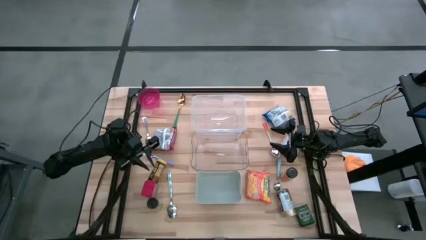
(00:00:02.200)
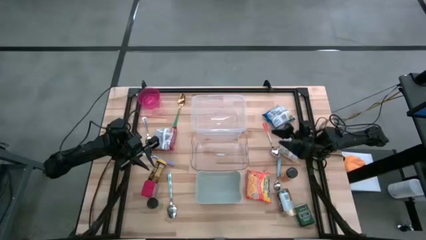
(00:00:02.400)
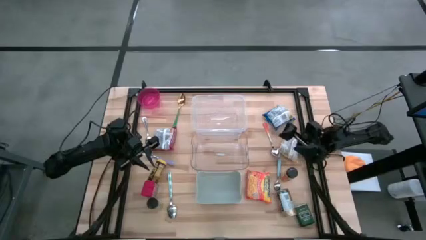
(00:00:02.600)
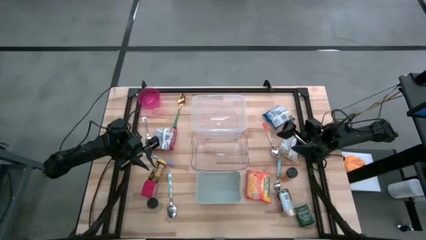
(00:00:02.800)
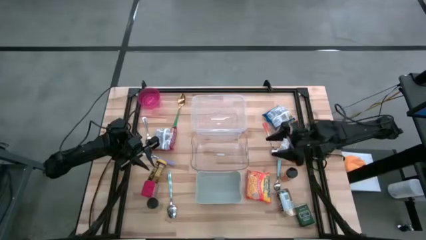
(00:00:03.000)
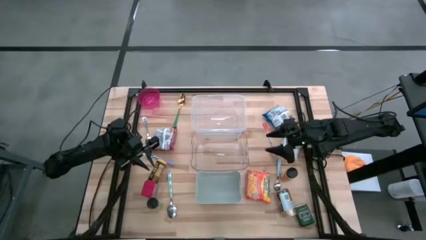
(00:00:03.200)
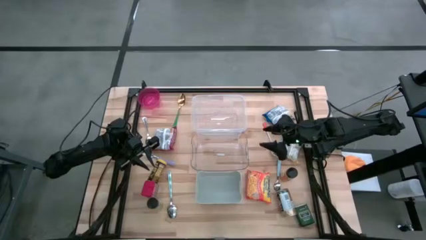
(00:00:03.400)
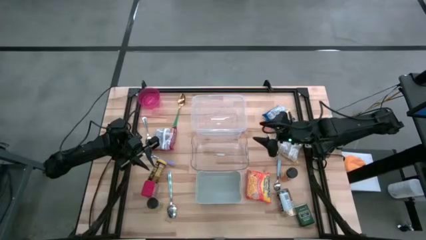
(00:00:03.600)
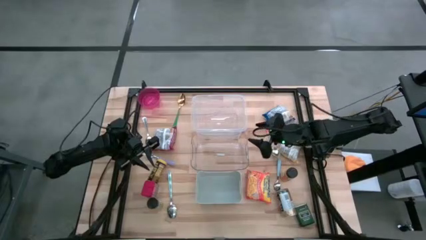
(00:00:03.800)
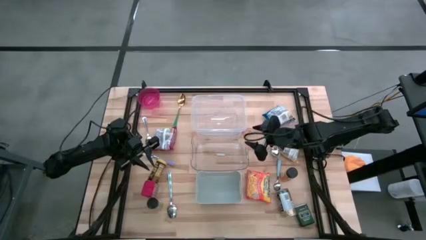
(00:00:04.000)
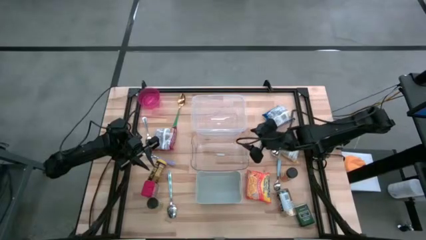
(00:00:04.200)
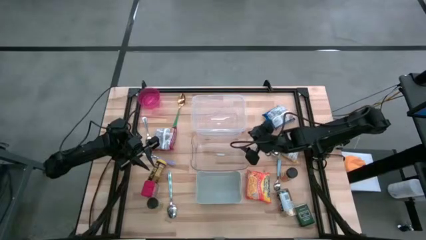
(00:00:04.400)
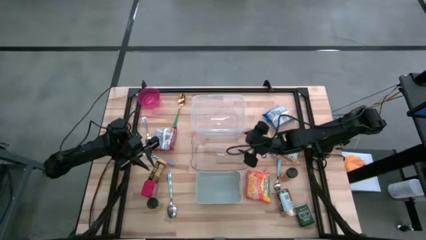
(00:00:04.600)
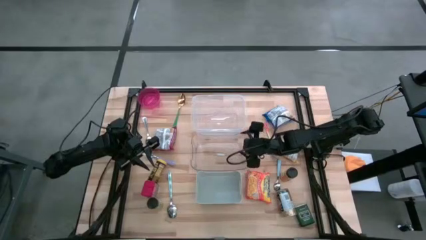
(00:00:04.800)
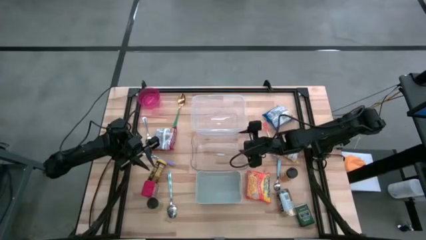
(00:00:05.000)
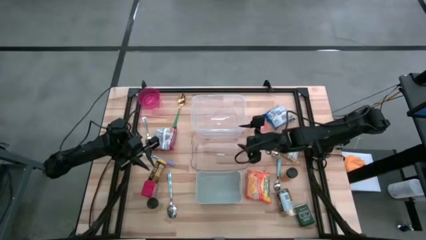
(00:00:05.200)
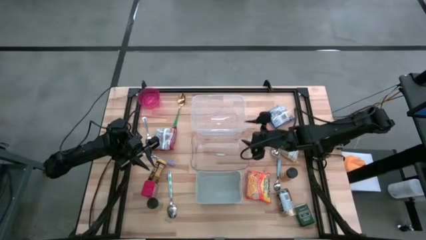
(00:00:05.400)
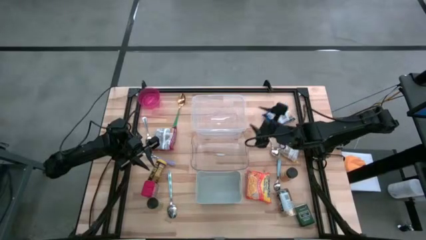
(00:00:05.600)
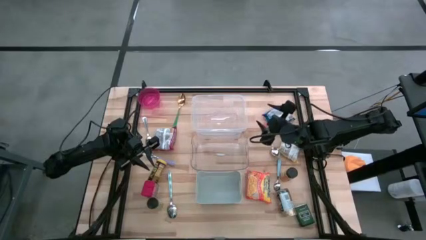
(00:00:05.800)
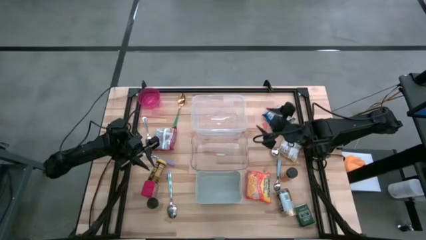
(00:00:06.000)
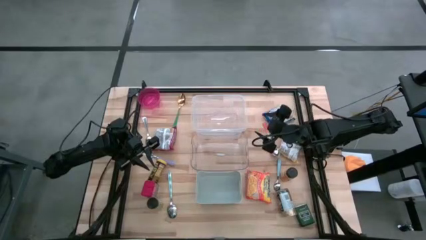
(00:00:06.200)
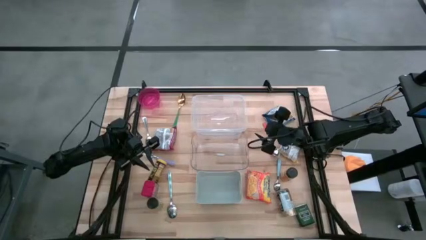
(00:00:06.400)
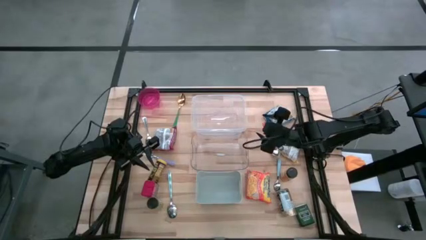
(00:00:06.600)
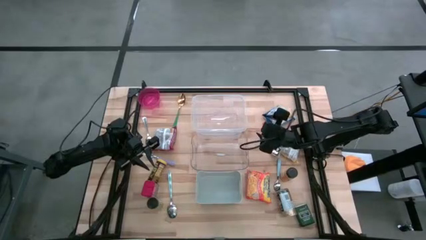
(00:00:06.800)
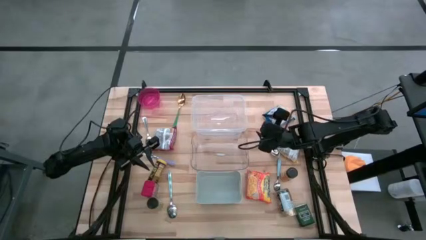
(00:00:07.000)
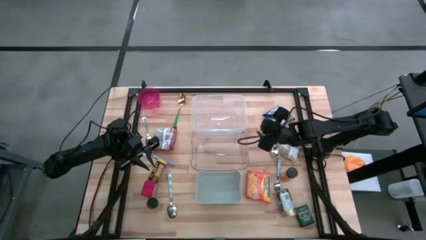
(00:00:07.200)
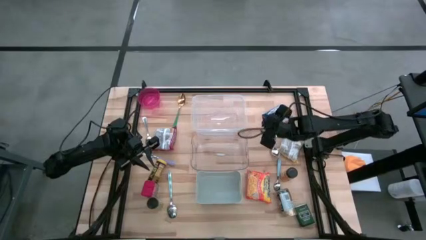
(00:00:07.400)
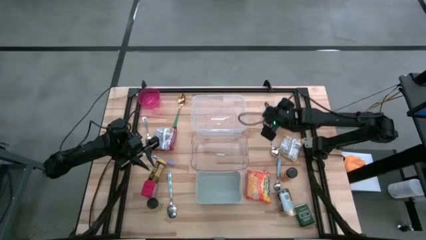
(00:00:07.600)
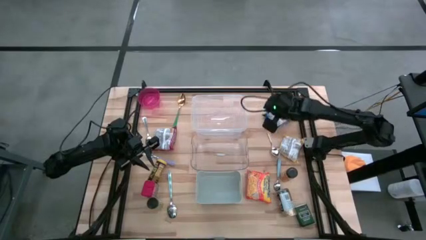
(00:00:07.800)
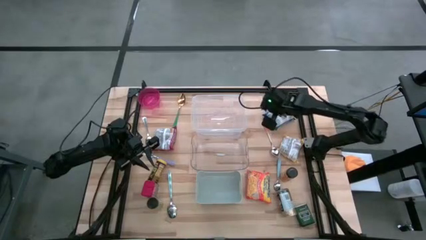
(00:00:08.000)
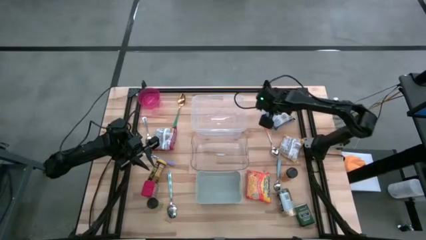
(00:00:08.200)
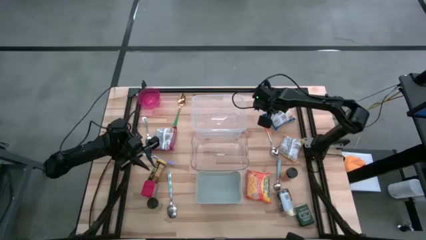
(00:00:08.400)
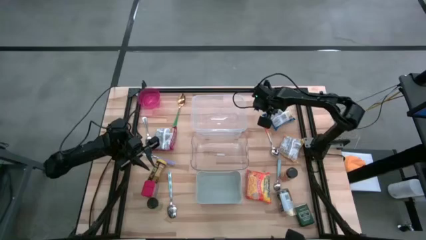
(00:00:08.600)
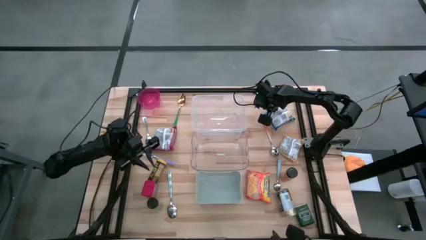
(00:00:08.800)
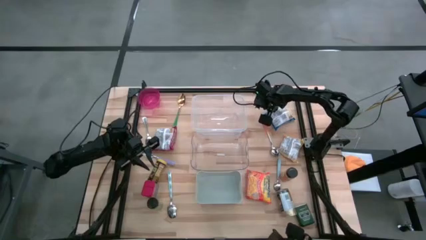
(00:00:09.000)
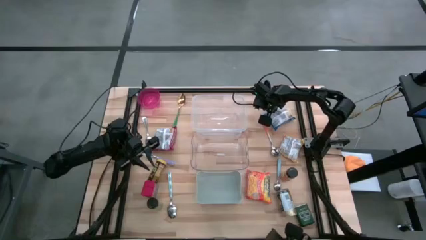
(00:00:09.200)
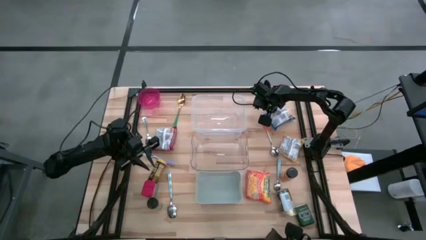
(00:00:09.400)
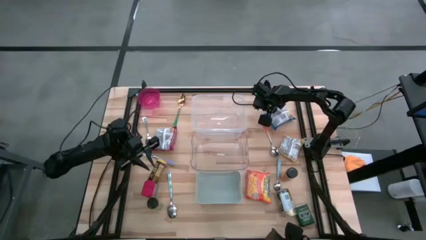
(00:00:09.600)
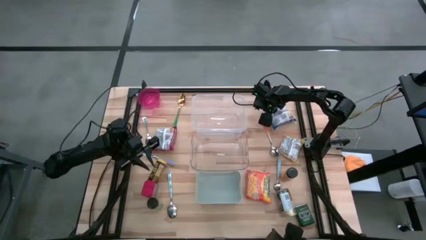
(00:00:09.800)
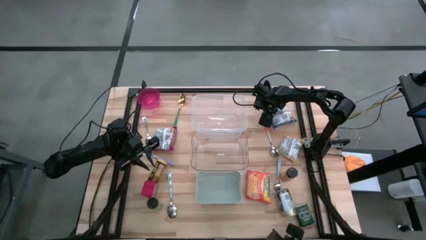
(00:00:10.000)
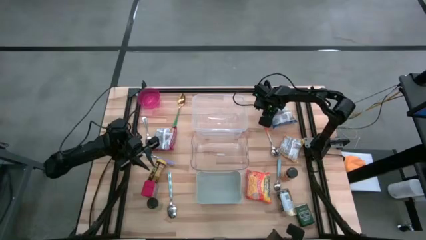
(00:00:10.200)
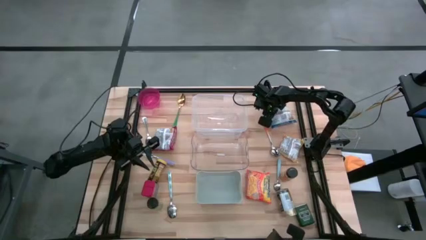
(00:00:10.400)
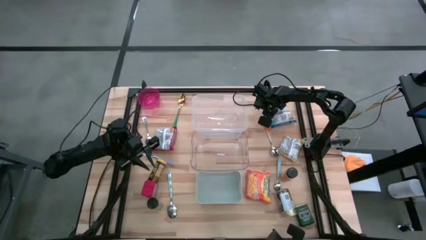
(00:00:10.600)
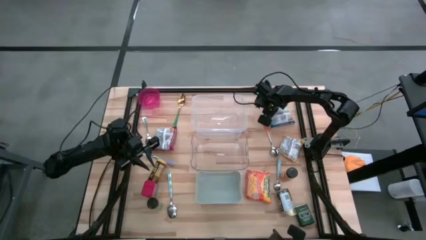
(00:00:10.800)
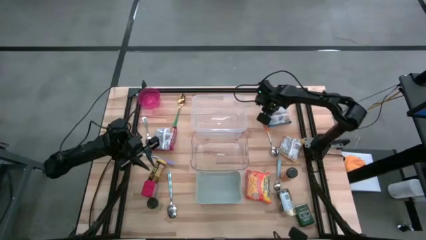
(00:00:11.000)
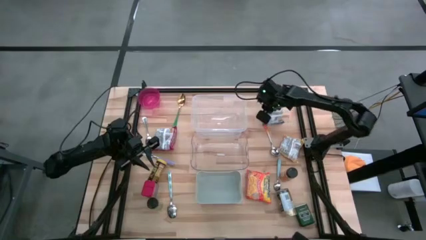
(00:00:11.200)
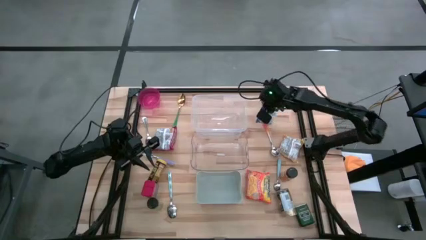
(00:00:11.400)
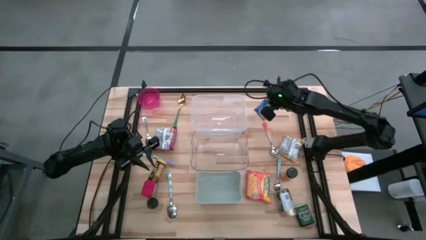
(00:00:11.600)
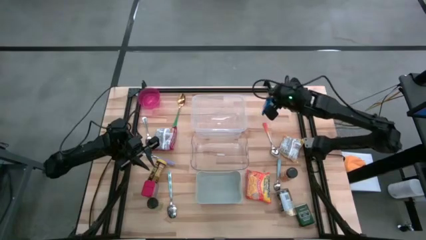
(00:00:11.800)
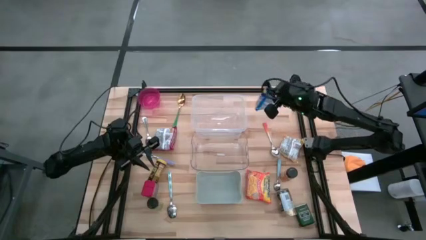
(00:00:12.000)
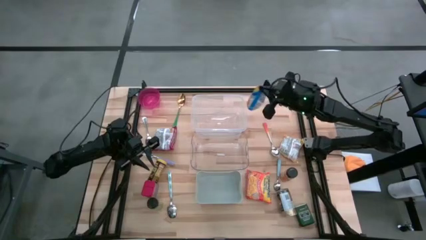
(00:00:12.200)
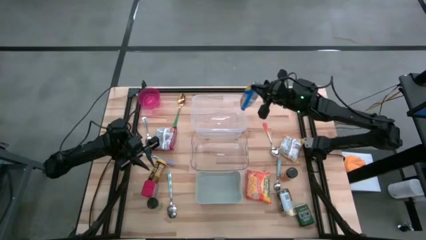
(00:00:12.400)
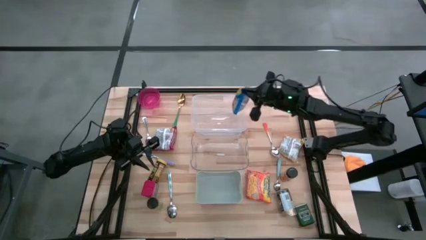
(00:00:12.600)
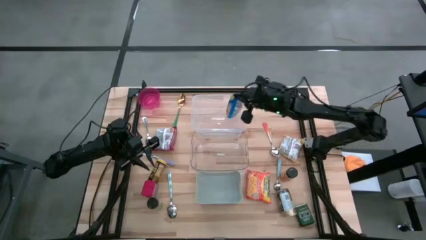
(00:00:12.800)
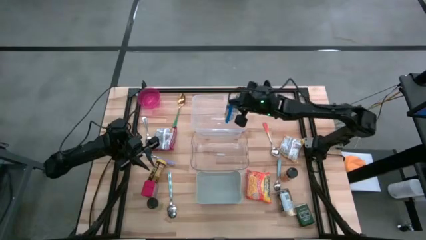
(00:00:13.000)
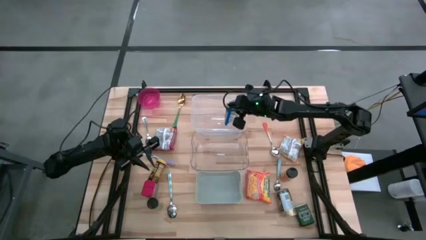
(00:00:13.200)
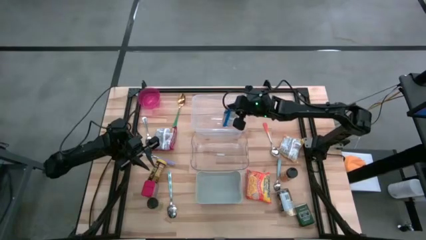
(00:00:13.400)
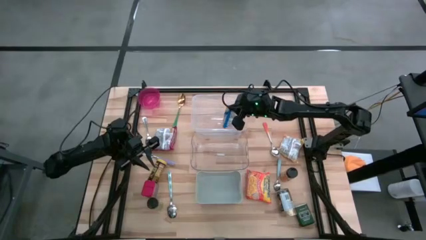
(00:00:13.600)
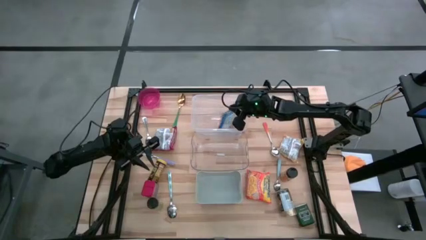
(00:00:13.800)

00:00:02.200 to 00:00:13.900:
Put the blue noodle pack into the white bin
